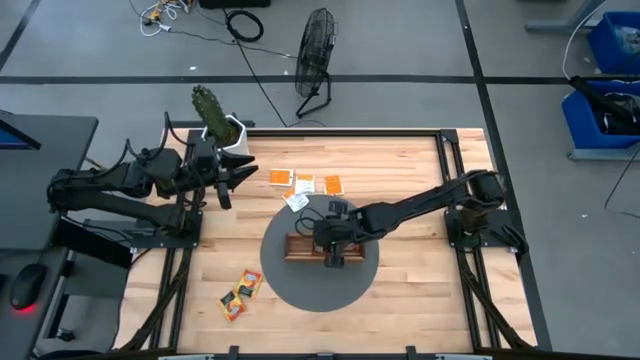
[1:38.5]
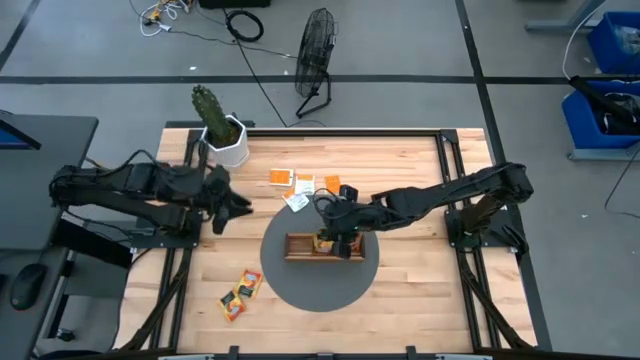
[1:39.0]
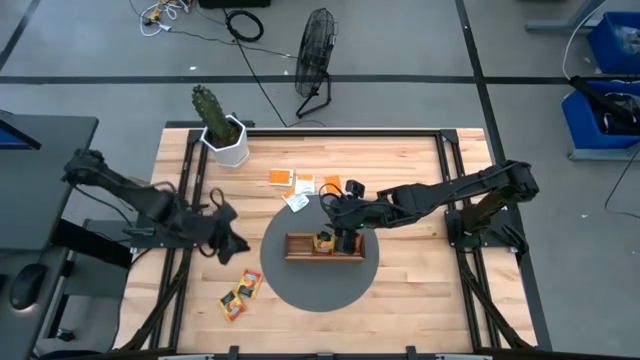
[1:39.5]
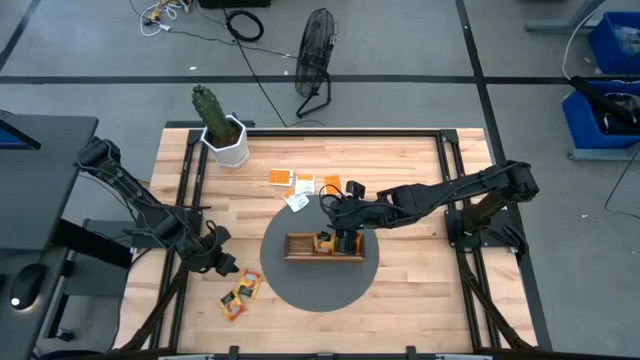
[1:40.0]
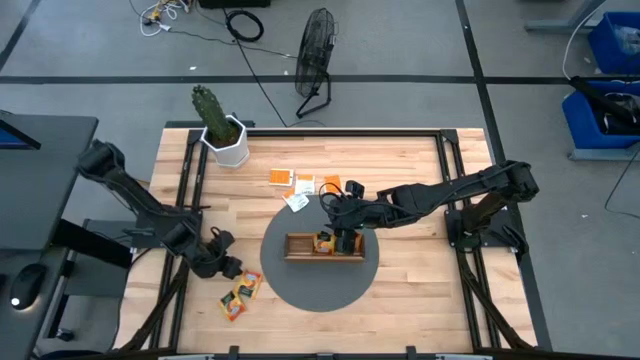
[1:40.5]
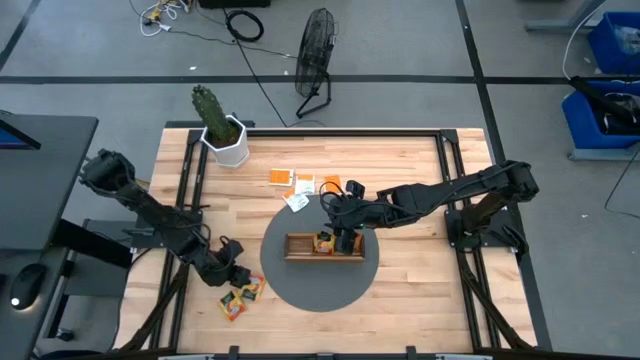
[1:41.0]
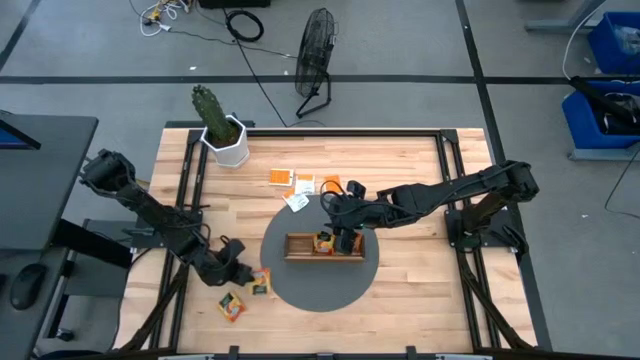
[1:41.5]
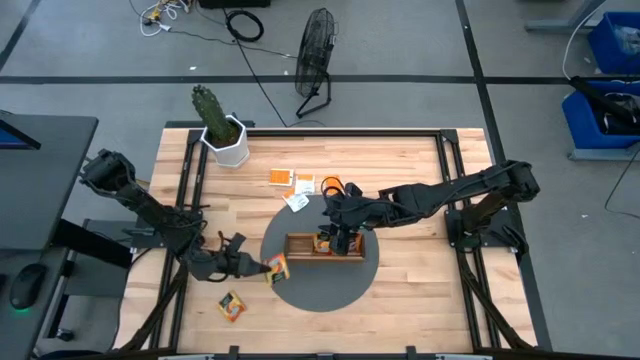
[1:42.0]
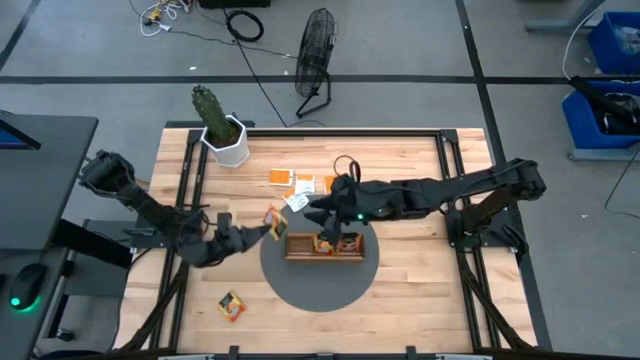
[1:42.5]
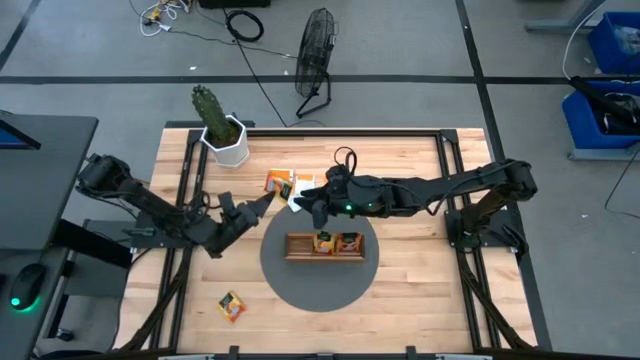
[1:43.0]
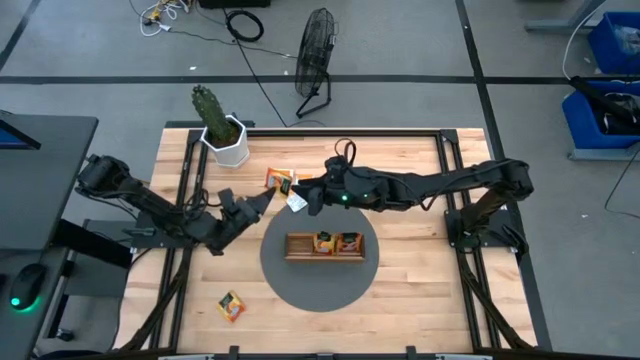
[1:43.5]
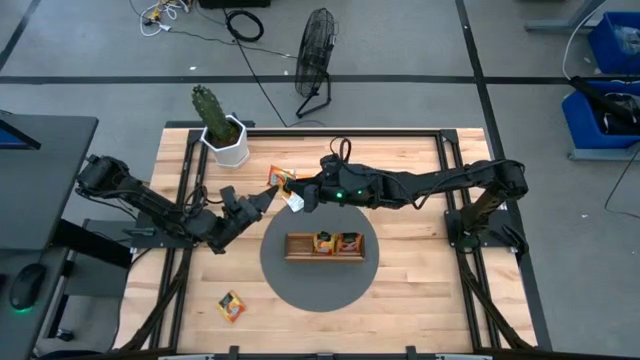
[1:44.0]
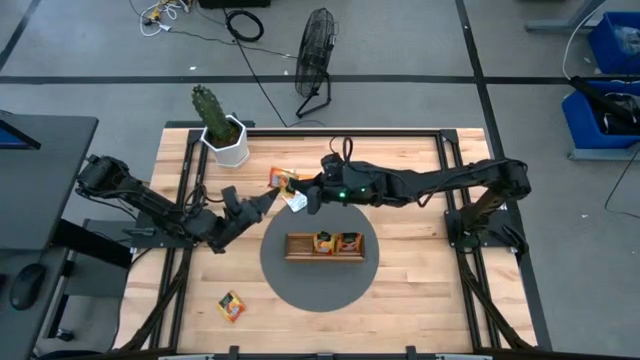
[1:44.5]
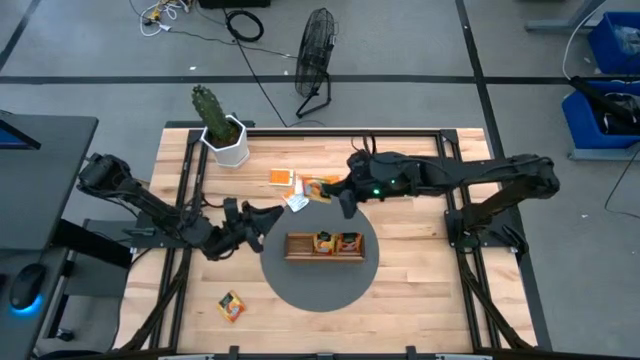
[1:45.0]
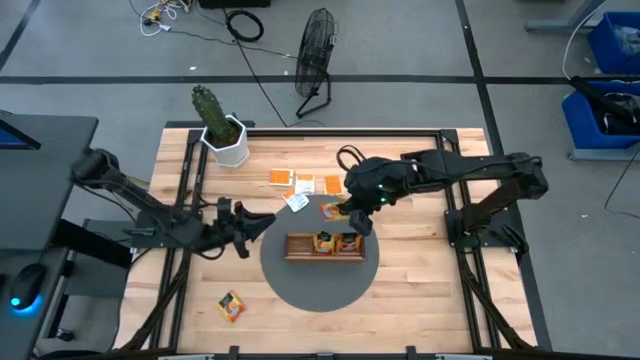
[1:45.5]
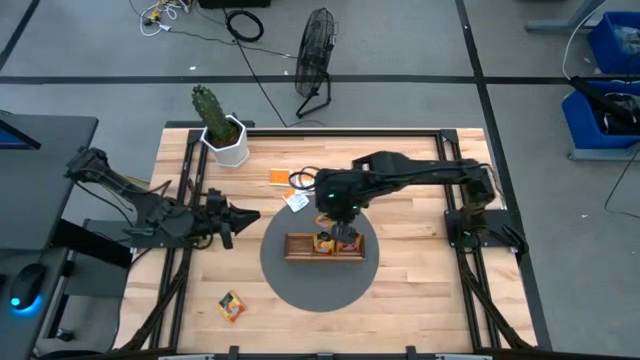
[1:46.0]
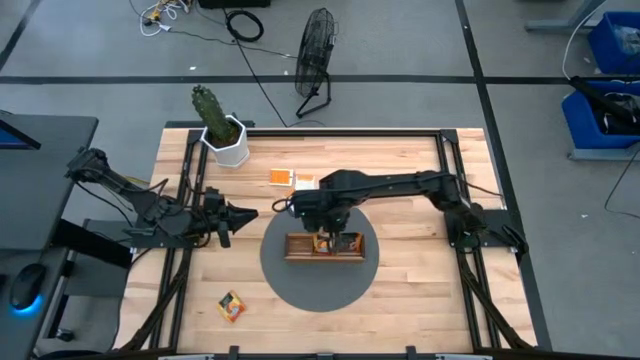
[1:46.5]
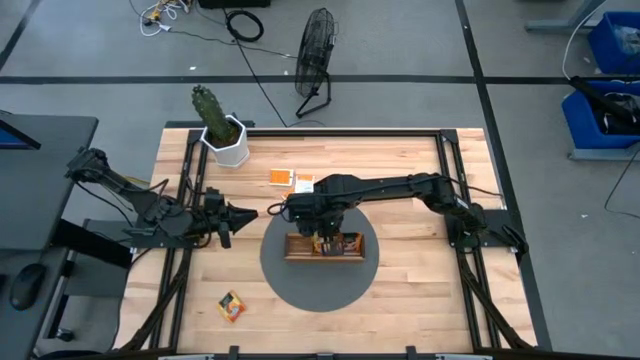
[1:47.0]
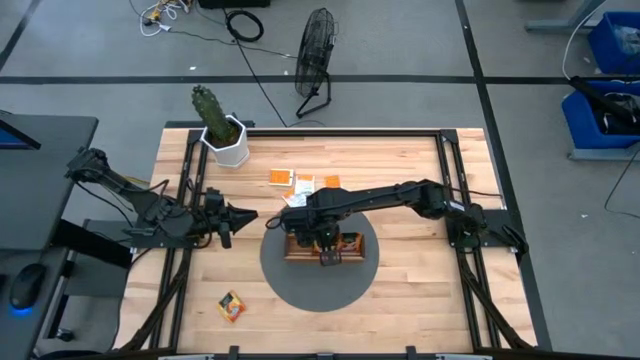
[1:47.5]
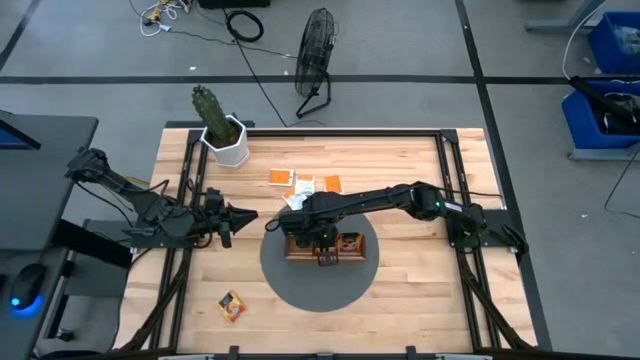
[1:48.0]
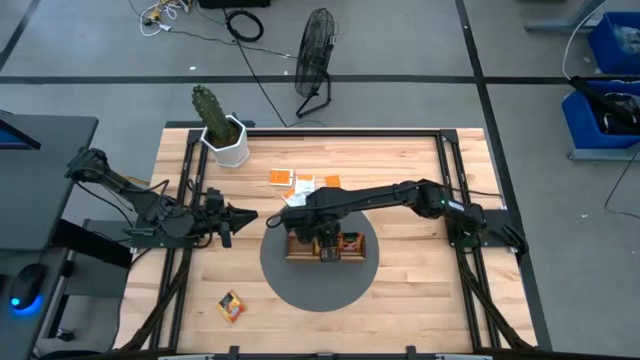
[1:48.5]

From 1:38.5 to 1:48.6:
Task: Pick & Place Tea
Put the yellow tea bag into the middle section of the wooden organizer

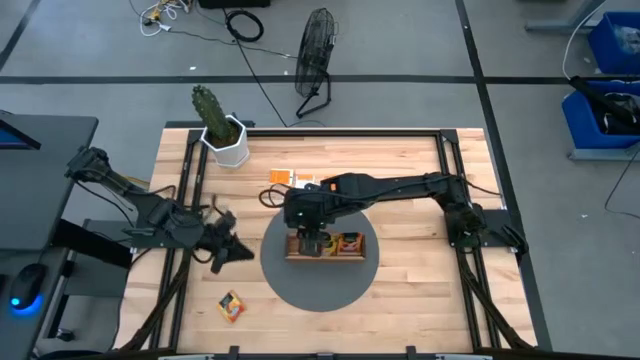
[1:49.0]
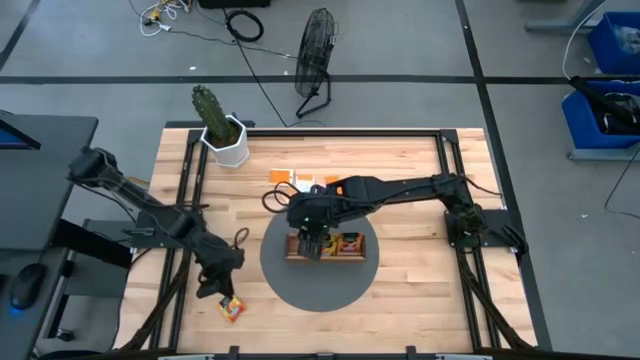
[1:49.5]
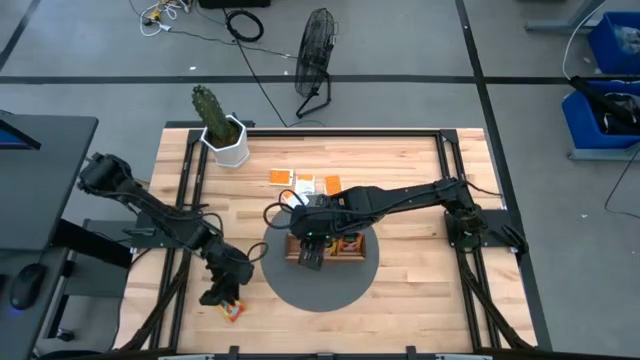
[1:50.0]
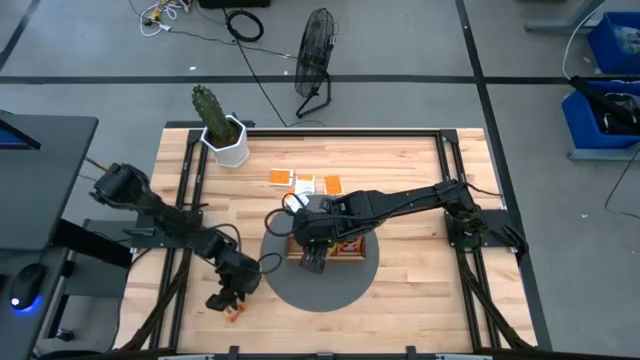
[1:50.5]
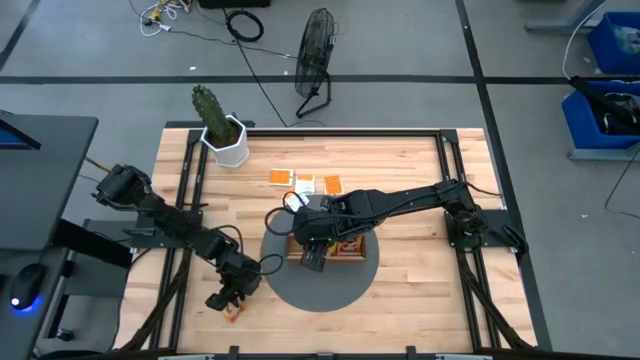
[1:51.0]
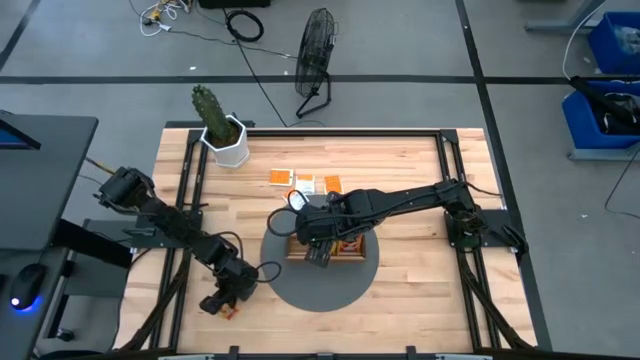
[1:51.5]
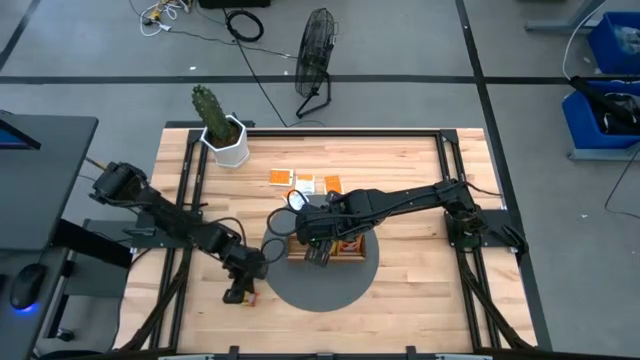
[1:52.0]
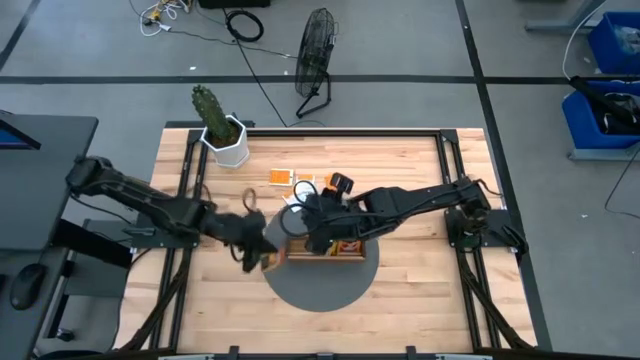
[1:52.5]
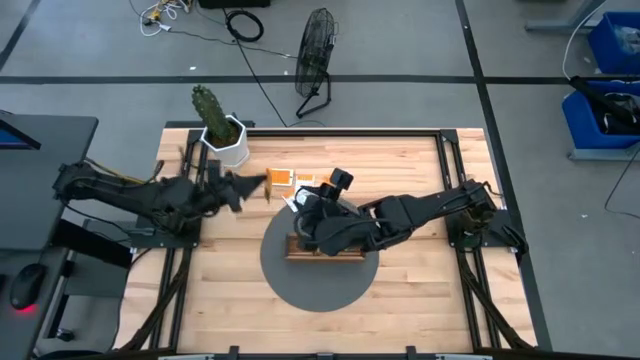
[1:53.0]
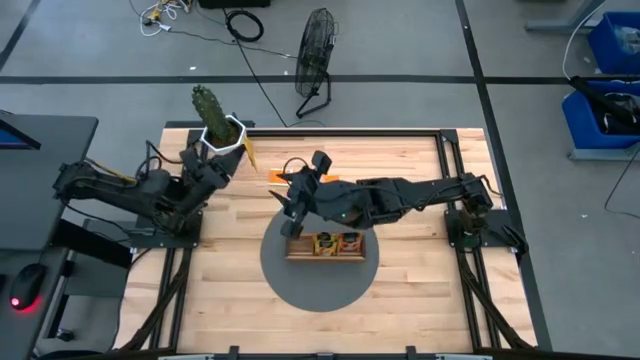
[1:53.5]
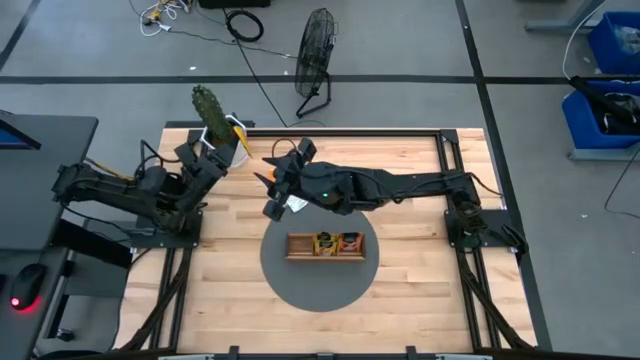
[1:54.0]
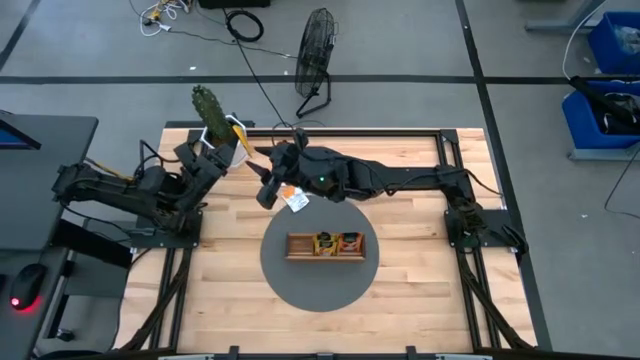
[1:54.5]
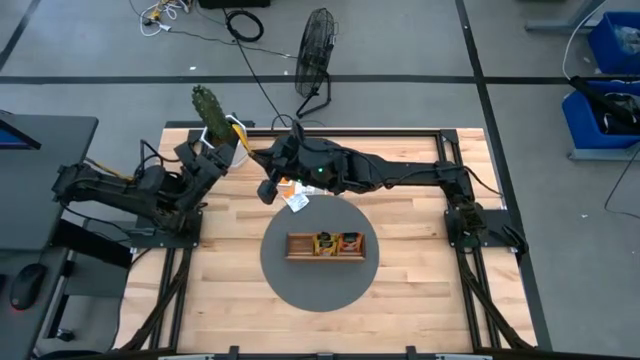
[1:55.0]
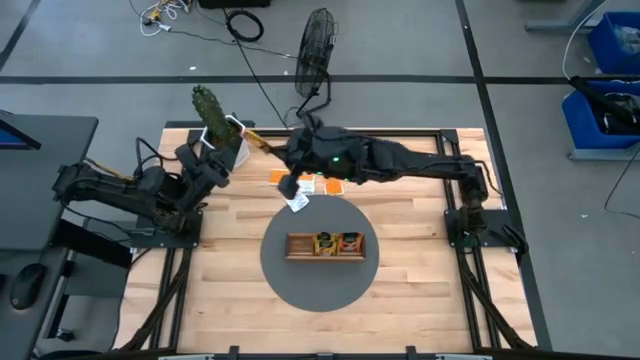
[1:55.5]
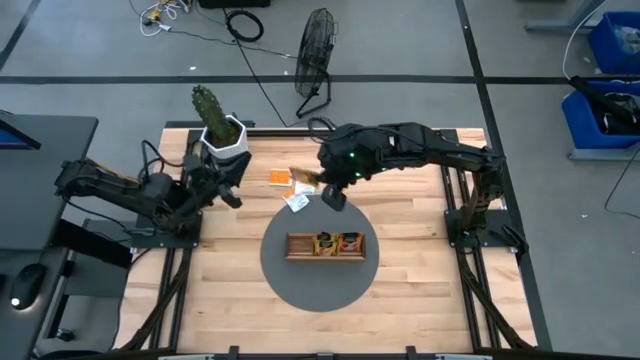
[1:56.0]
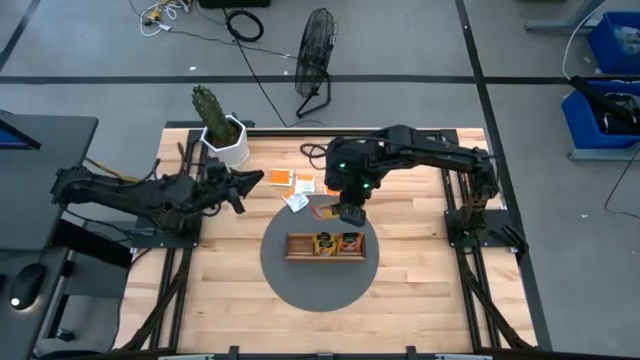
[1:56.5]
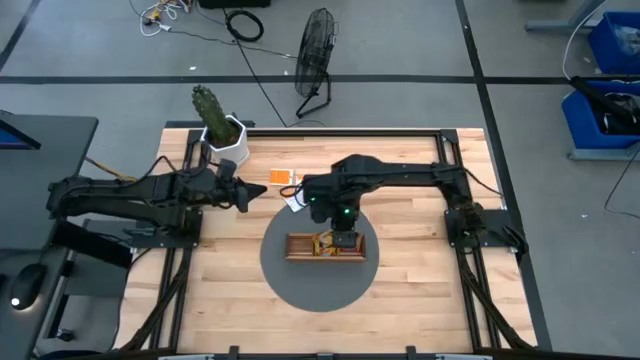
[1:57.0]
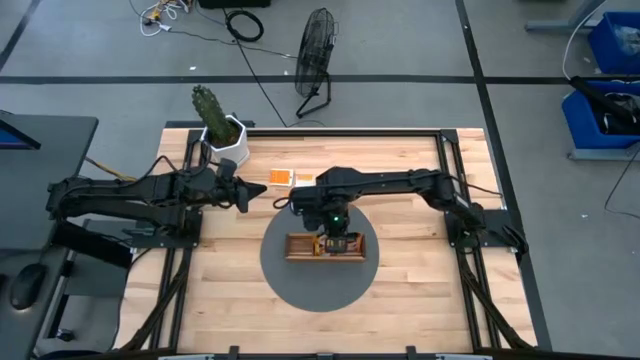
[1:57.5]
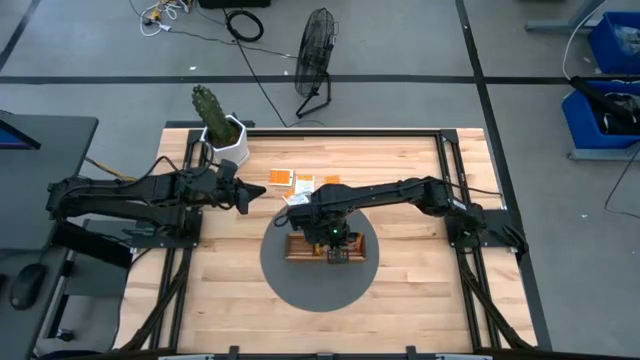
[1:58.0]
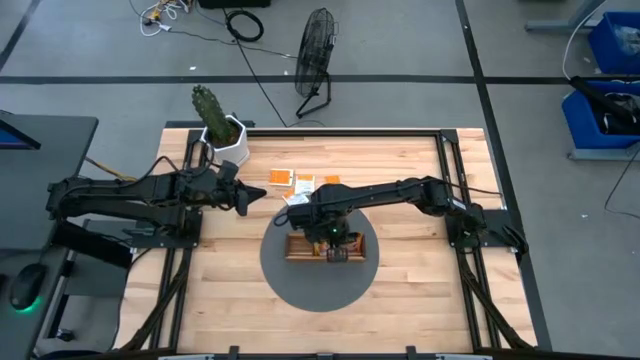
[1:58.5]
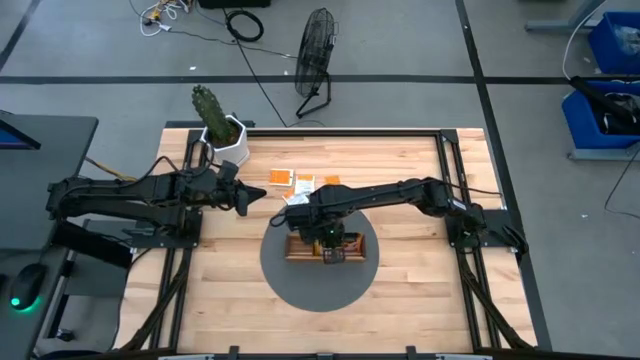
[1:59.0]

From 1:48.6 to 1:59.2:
Put the yellow tea bag into the middle section of the wooden organizer
